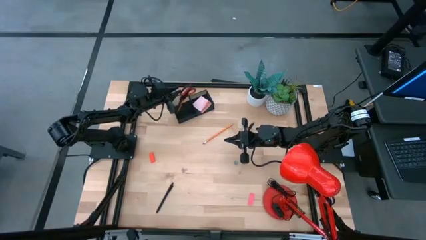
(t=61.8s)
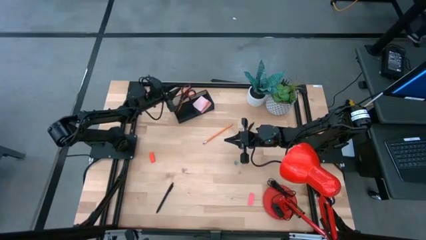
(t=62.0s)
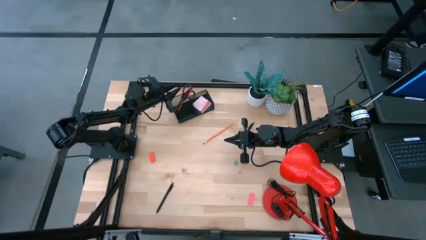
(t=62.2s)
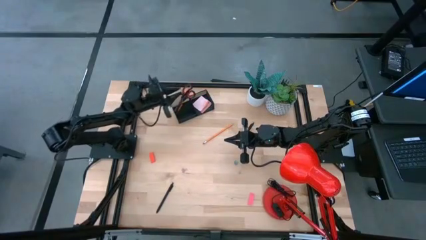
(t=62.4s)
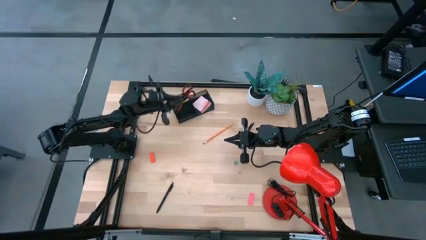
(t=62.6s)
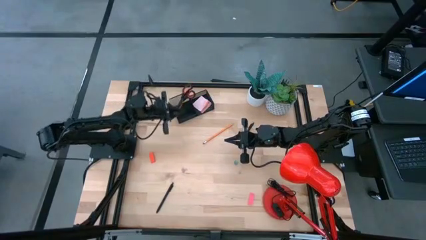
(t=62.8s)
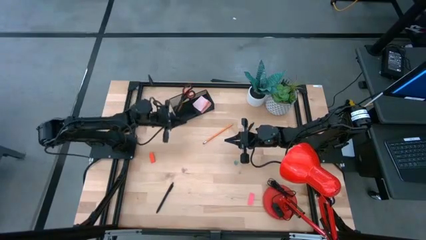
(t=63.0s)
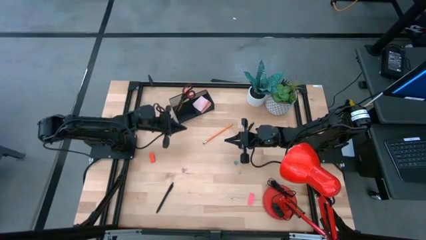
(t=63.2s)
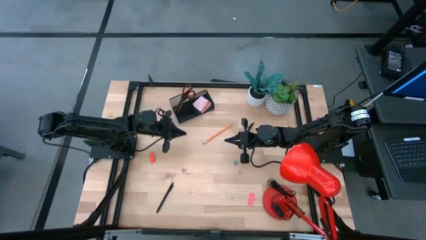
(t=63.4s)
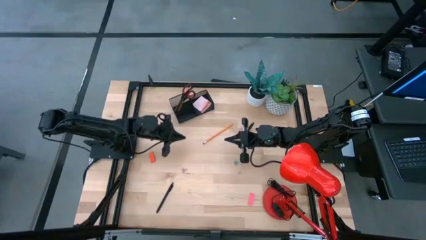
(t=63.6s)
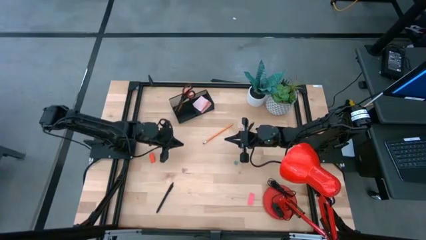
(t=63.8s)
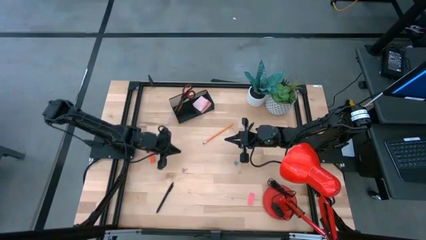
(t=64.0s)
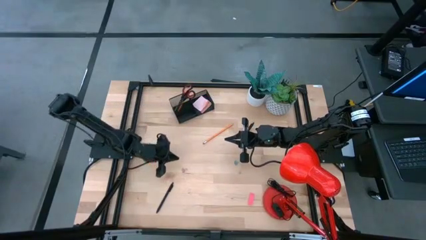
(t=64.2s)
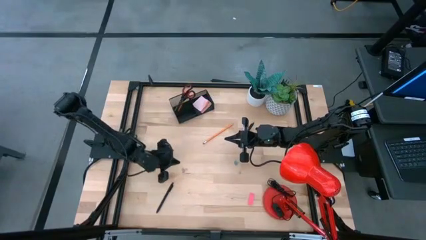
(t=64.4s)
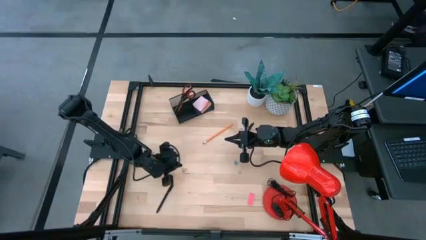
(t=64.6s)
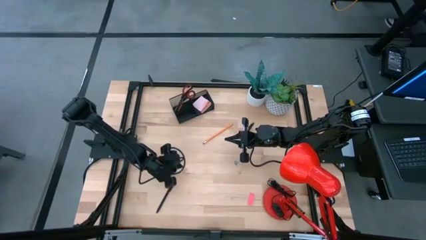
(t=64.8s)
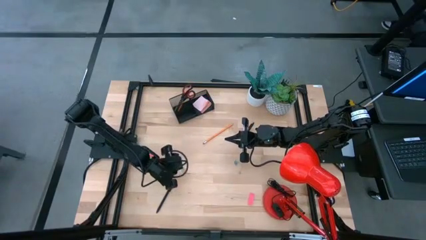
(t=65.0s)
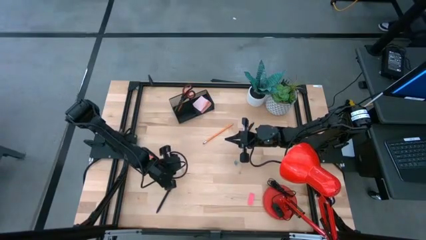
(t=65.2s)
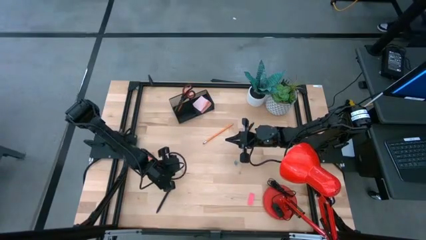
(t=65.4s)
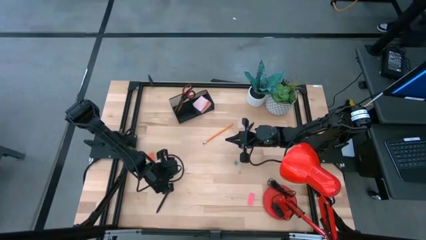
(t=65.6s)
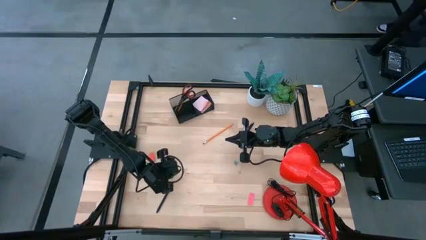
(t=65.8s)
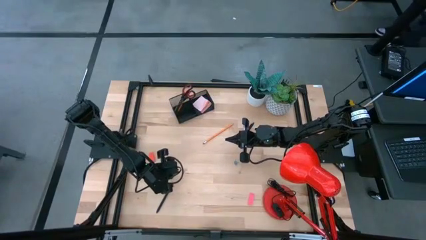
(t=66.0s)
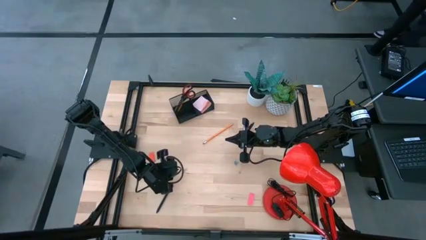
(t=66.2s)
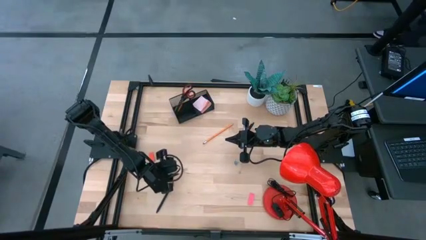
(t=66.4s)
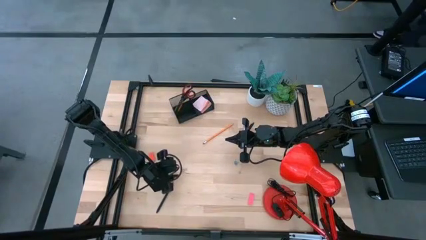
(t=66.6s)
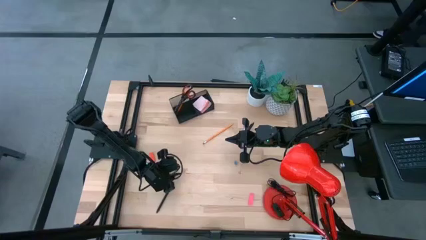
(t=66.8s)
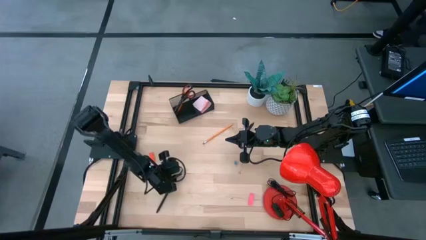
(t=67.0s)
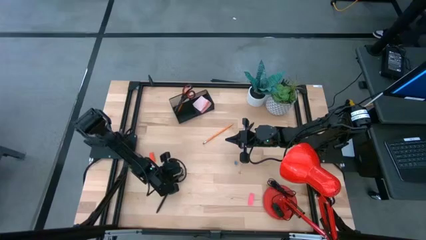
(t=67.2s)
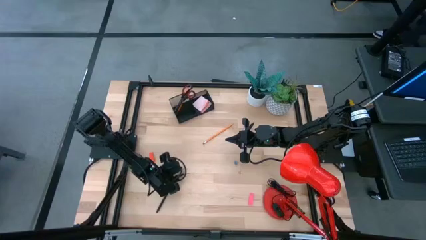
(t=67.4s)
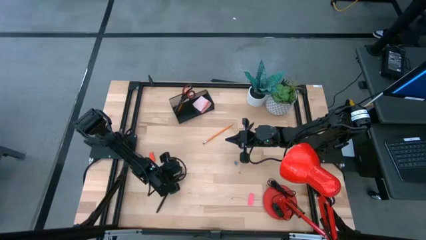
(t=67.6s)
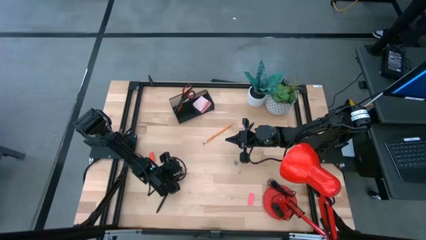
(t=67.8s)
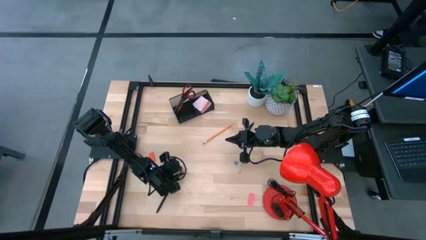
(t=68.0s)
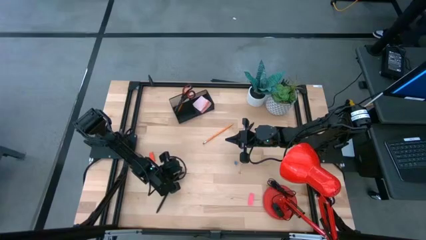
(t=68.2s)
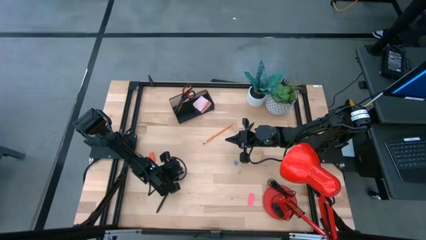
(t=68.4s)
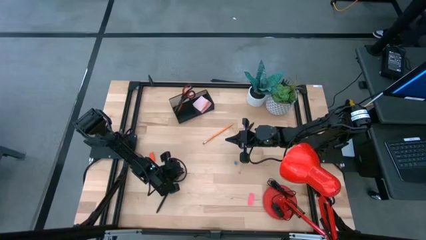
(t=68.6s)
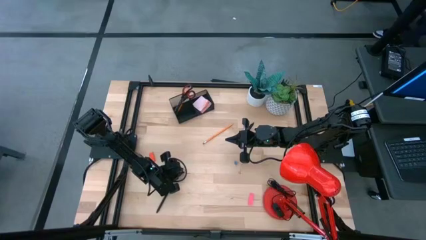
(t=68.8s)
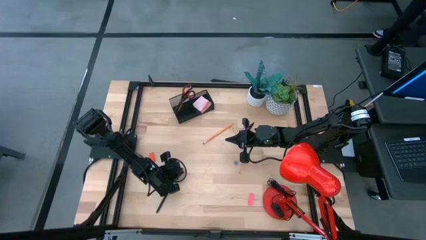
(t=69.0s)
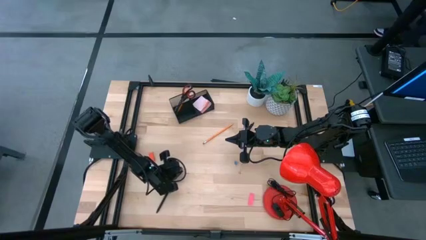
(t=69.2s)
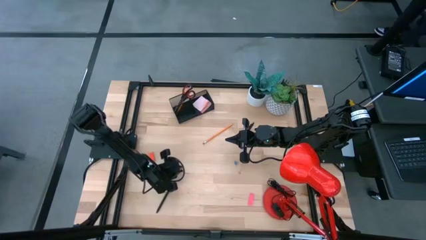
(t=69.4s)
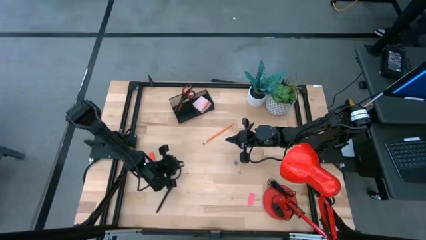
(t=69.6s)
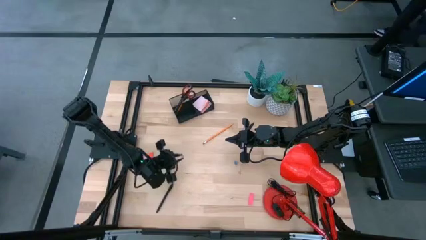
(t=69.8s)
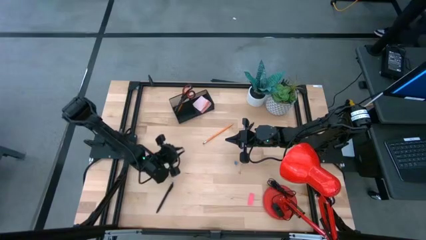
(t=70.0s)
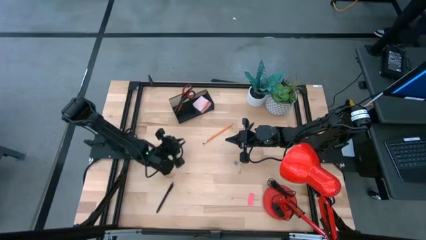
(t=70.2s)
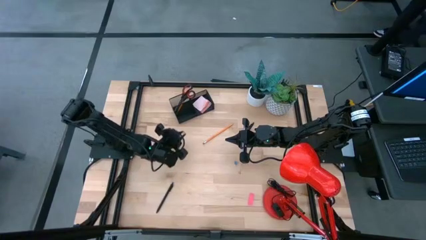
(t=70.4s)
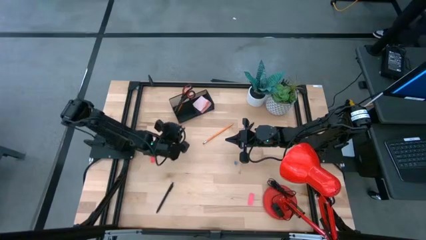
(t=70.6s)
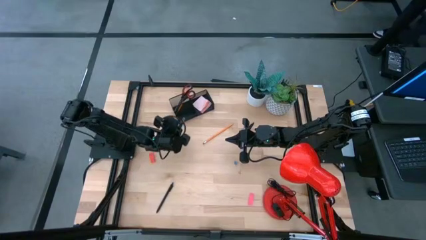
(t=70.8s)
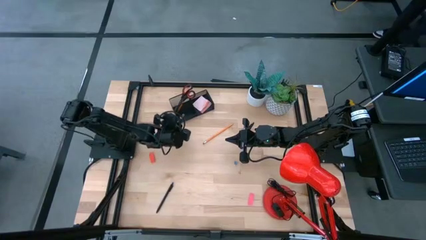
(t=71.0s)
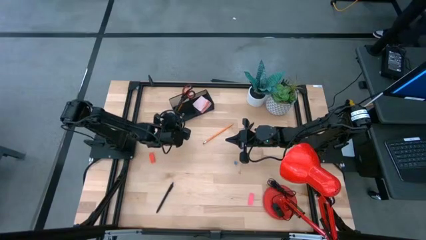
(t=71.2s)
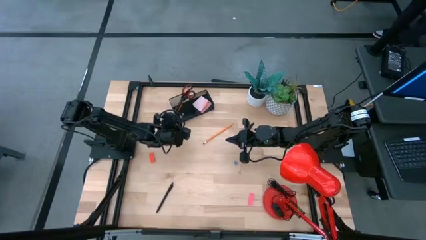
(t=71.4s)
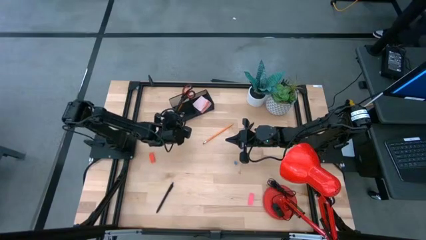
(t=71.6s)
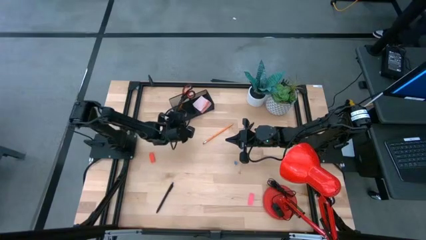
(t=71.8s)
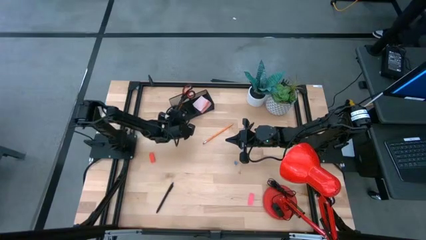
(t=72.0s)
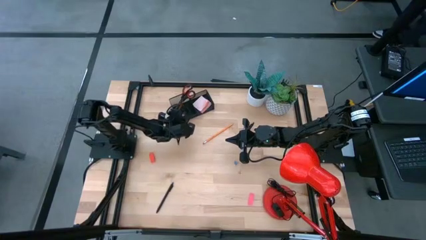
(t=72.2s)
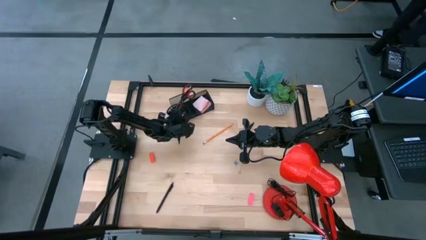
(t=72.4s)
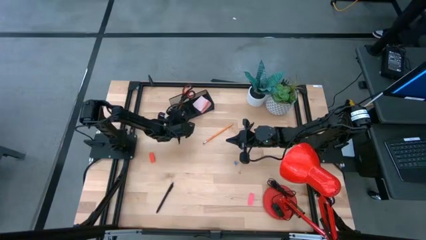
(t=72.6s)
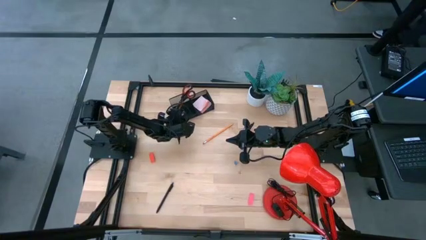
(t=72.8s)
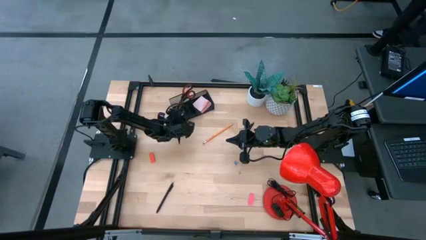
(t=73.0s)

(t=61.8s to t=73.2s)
Task: Pick and place office supplies into organizer
Put the pink binder clip into the desk organizer
